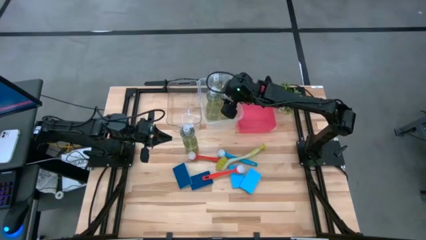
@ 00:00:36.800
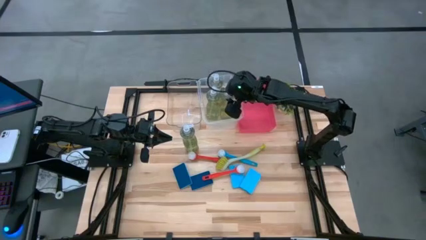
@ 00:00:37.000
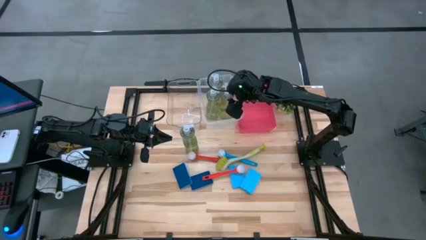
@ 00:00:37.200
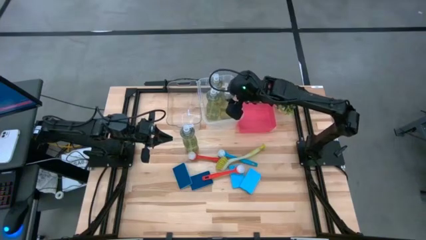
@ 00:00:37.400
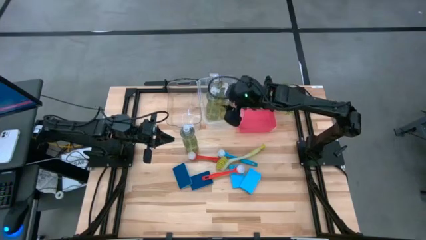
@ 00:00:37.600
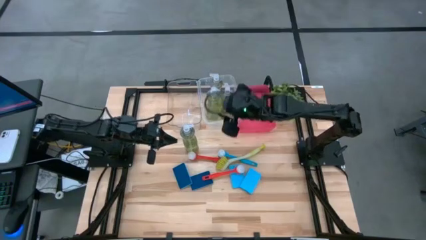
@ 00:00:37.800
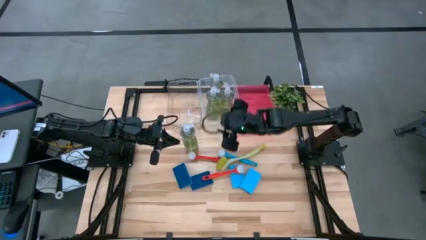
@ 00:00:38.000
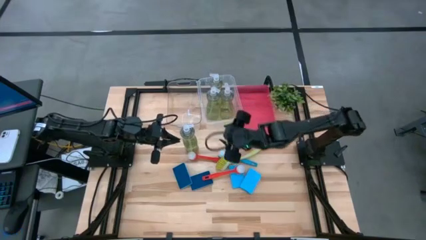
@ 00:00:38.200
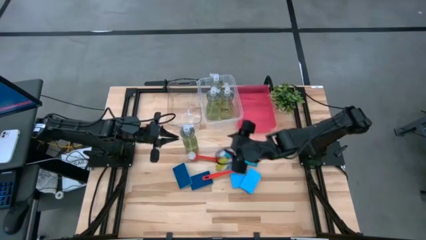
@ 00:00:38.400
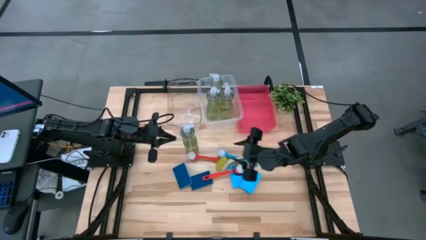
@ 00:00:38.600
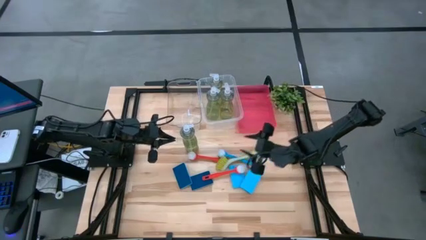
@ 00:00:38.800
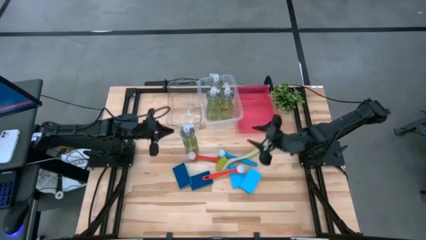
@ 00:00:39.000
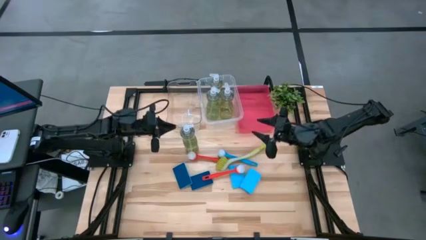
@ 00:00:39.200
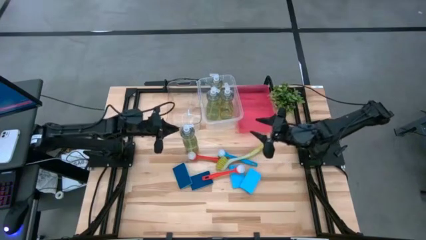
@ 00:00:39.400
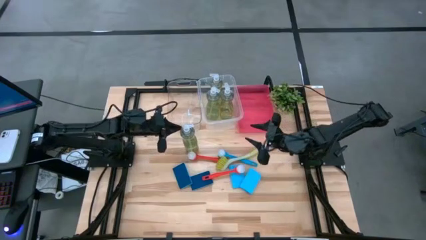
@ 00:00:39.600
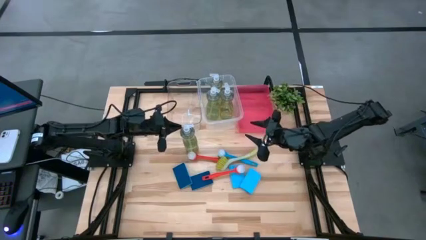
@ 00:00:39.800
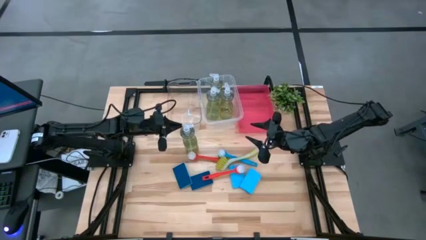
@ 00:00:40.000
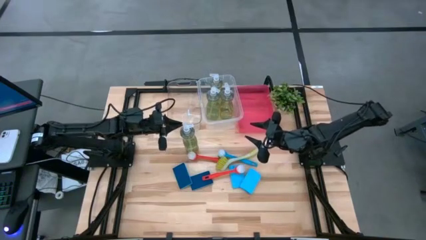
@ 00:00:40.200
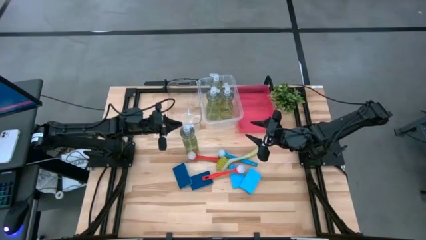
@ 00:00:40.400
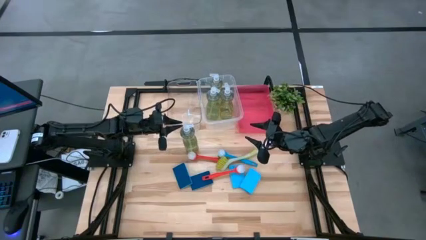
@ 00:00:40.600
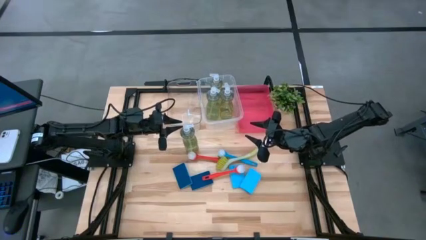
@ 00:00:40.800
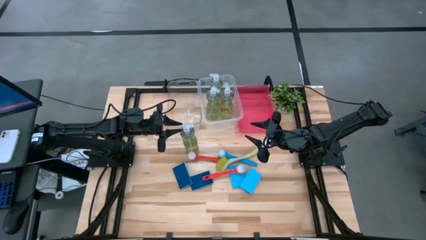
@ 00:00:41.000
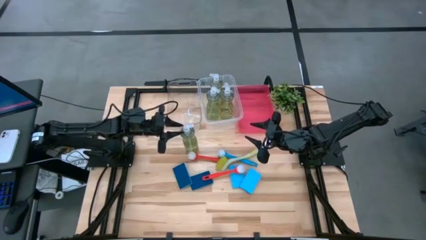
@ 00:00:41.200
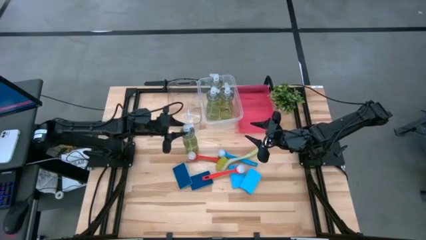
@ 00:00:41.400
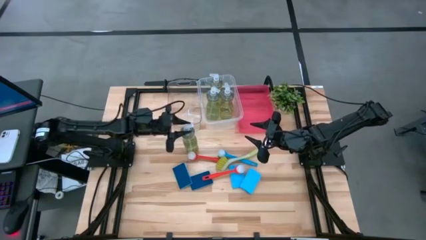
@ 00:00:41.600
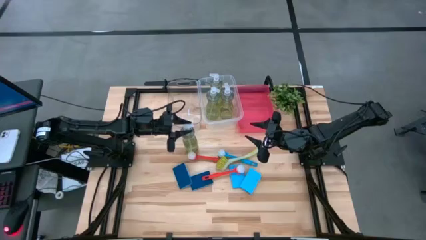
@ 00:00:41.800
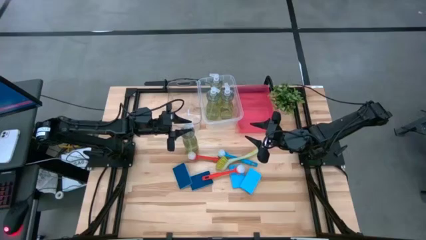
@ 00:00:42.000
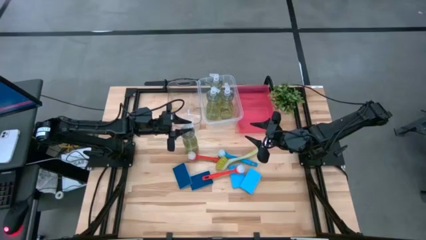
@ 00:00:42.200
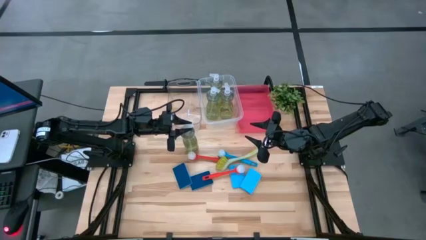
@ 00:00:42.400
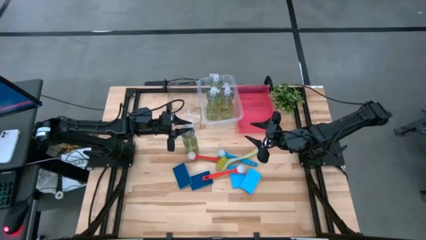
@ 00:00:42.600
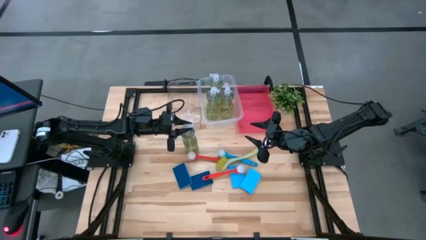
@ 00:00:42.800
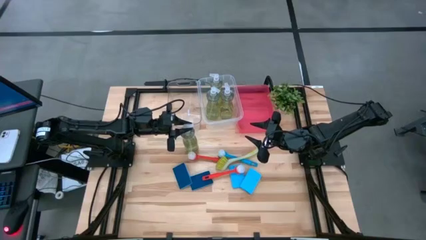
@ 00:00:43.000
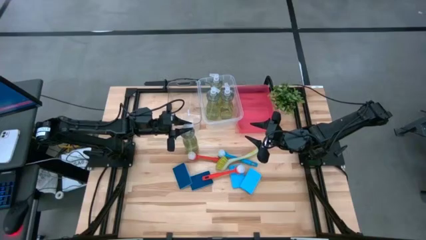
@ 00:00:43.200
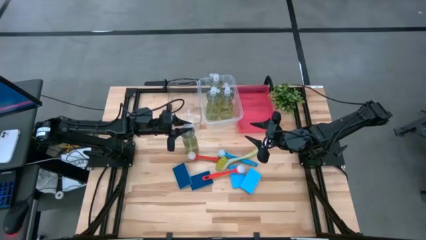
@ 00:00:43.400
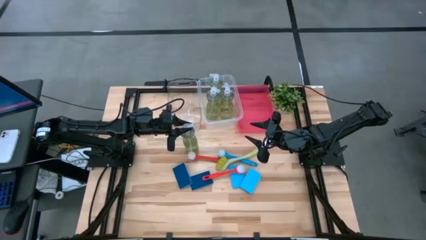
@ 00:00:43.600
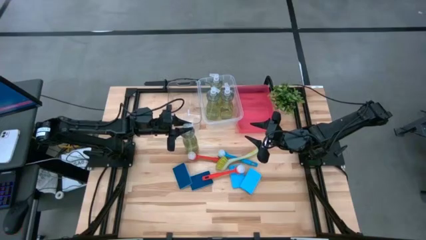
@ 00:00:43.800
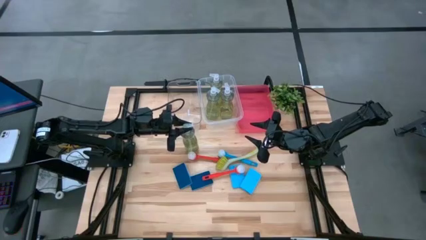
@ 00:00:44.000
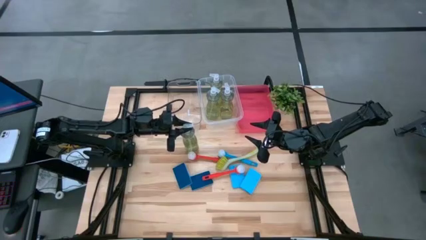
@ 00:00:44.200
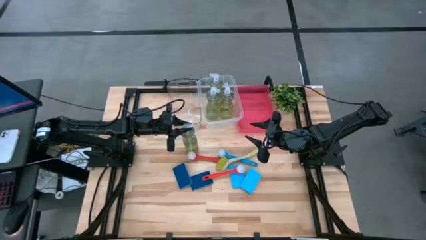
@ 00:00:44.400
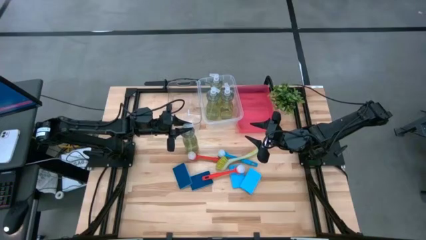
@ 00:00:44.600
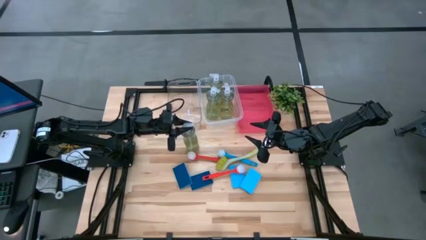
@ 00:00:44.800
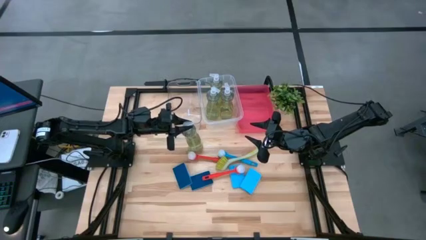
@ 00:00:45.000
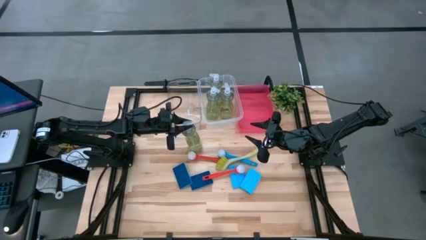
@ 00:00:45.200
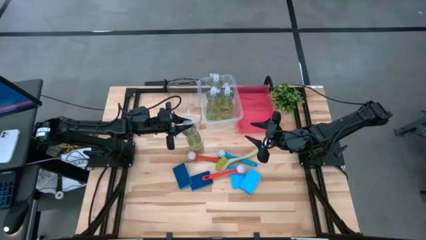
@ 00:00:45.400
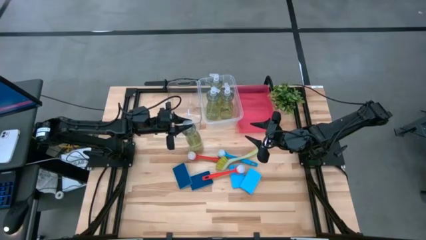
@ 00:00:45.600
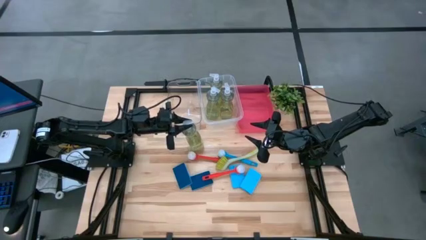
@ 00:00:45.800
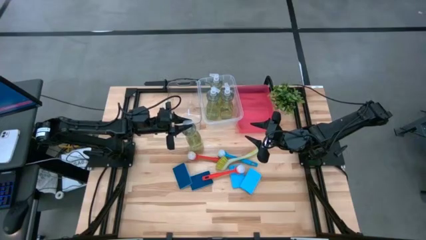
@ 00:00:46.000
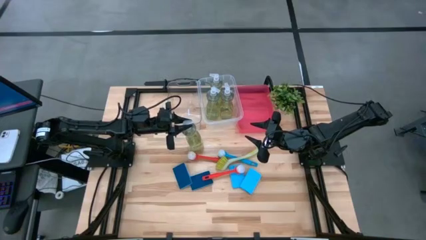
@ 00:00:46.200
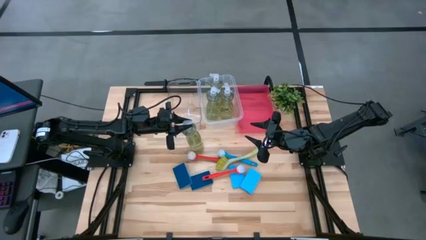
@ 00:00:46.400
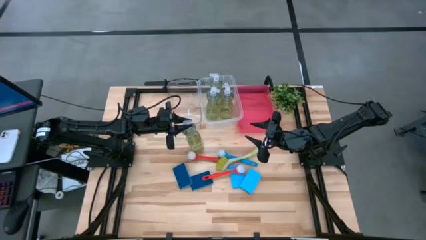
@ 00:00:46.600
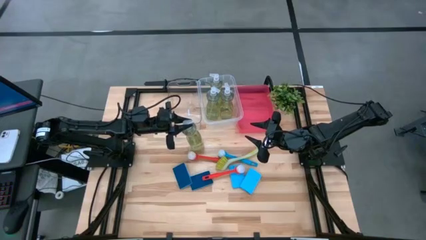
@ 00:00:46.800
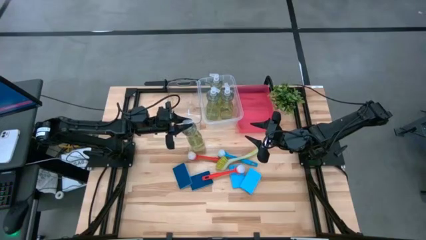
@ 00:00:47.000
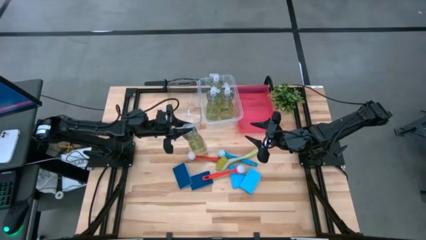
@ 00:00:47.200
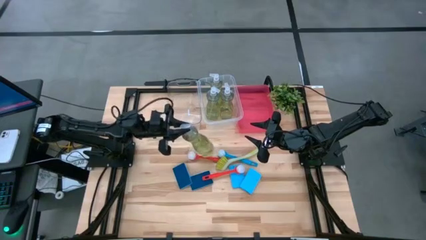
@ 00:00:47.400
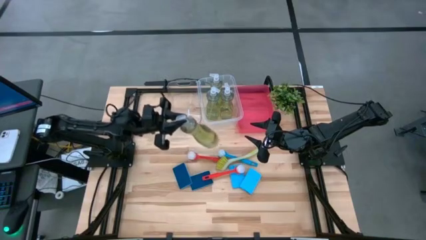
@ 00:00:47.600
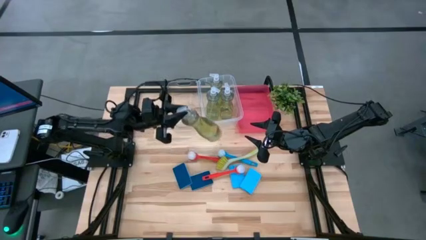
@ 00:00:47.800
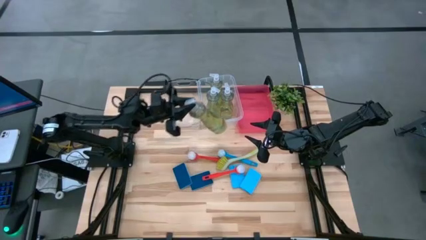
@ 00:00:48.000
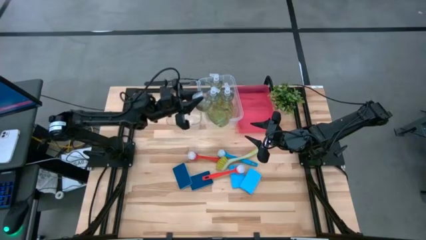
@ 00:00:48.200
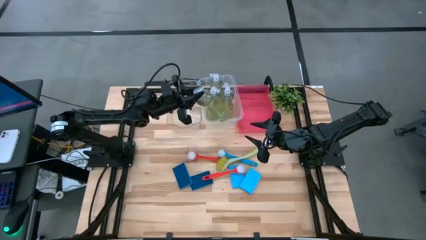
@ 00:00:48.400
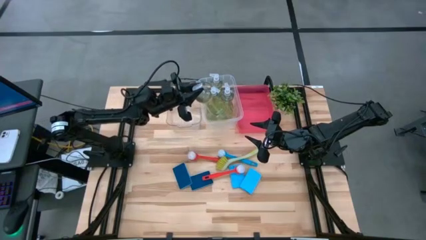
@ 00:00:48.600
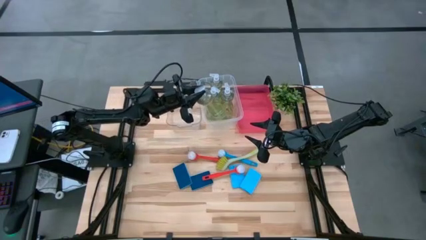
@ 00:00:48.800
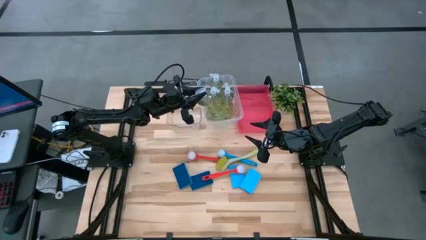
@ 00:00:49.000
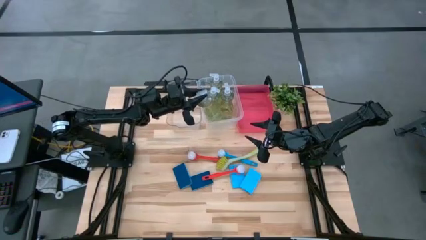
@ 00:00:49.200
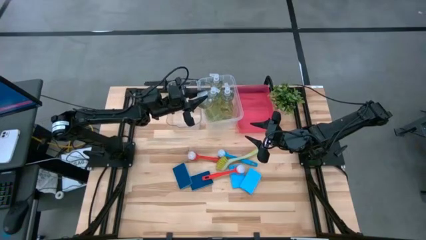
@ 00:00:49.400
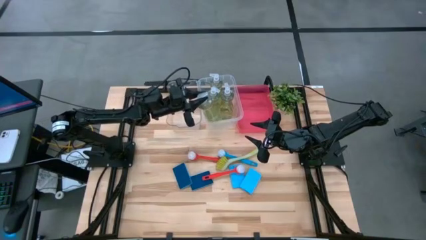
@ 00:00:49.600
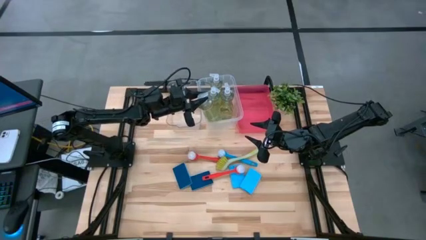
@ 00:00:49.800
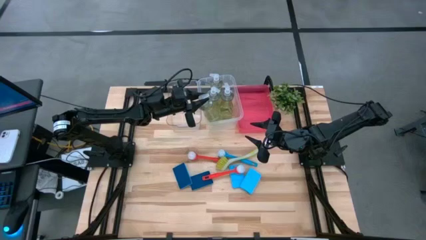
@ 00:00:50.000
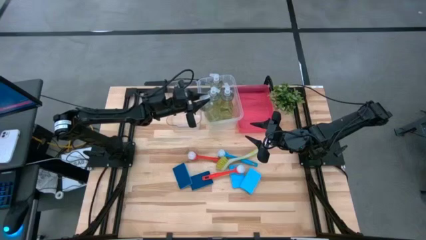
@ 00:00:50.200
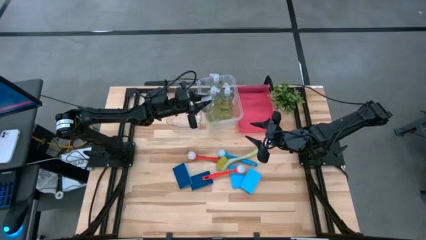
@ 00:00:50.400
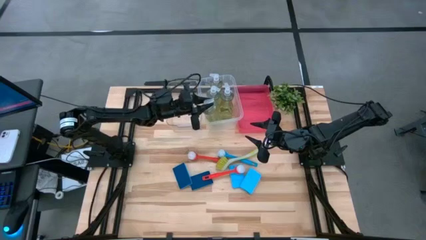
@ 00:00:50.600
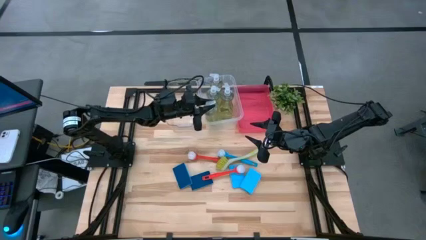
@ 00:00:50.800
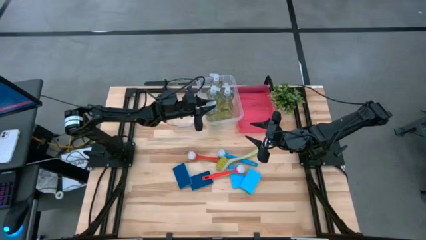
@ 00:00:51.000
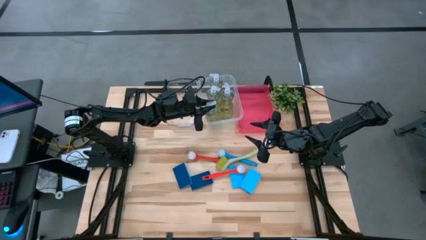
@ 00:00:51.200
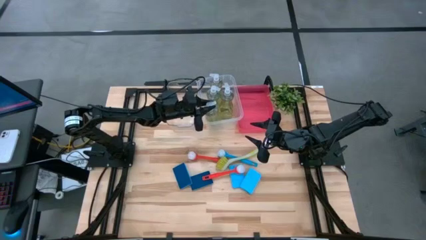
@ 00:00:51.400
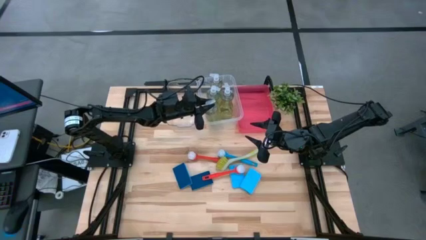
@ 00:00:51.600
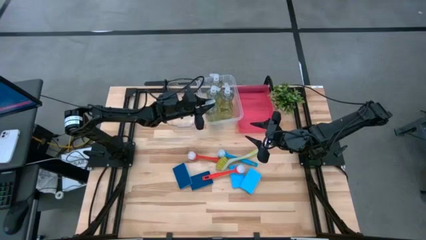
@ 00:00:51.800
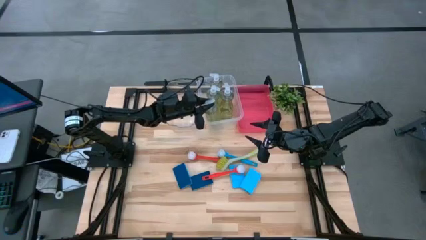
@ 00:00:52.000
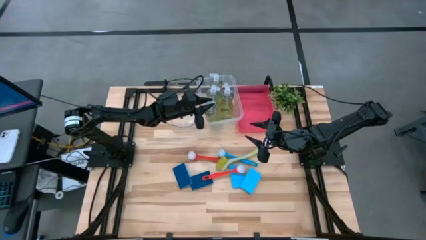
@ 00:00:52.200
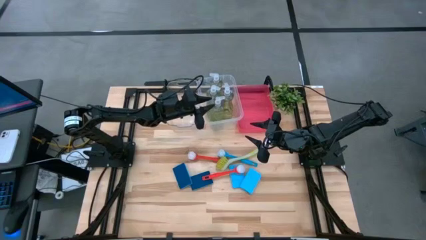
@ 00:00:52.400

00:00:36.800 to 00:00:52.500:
Task: Pick & Place Kitchen Sink Supplies
Put the yellow soap dispenser into the right transparent bin
